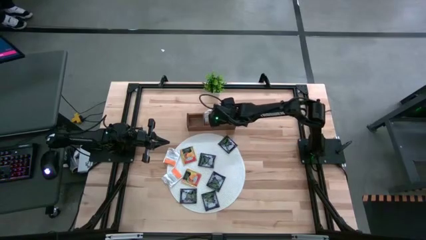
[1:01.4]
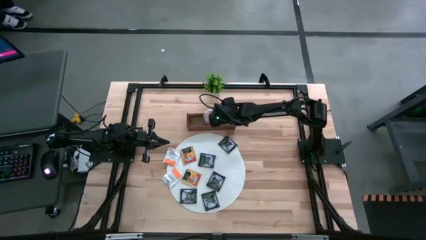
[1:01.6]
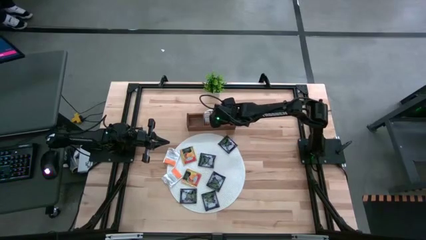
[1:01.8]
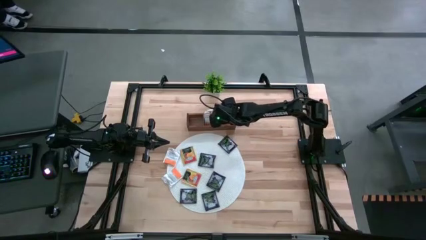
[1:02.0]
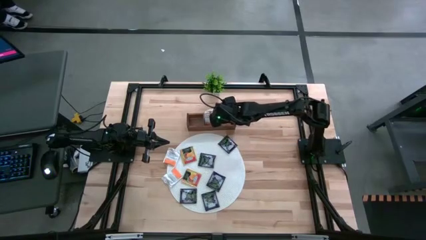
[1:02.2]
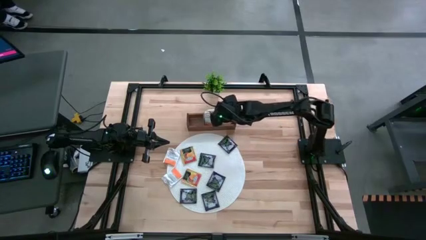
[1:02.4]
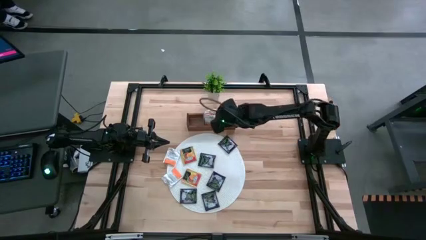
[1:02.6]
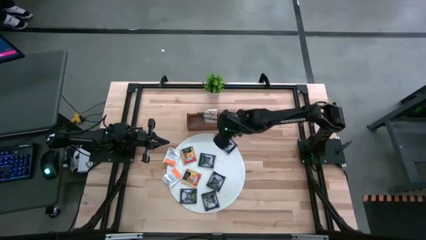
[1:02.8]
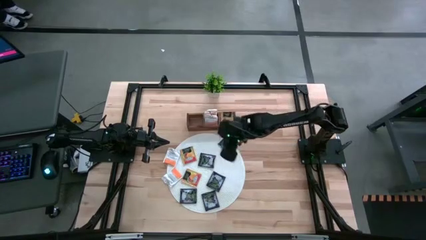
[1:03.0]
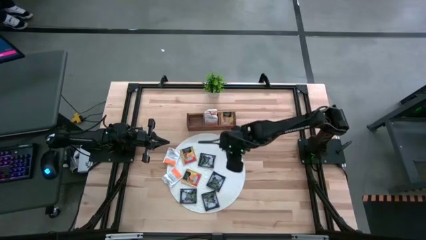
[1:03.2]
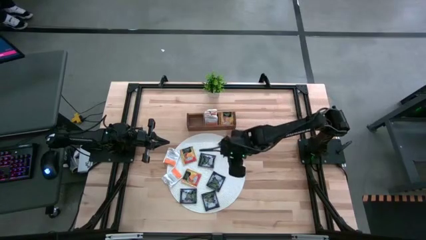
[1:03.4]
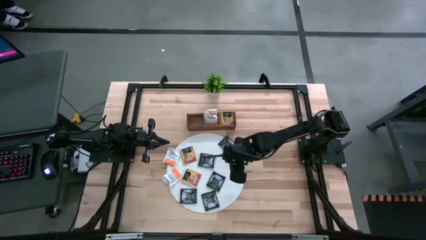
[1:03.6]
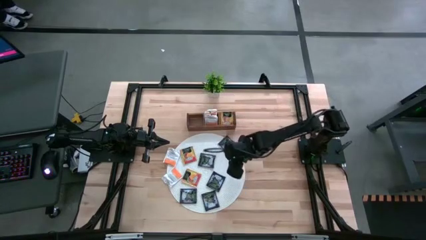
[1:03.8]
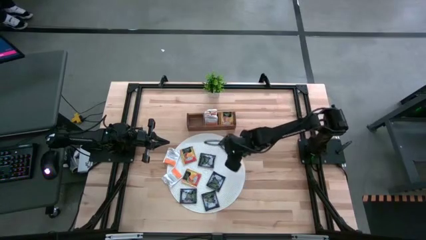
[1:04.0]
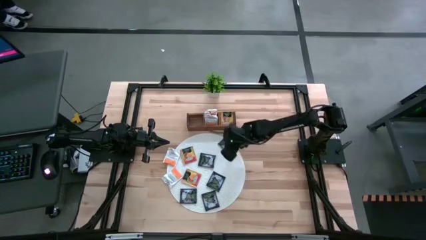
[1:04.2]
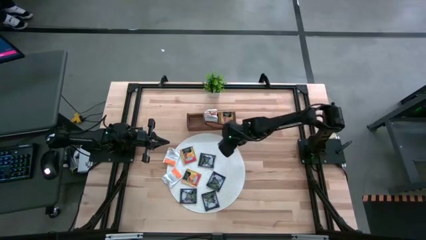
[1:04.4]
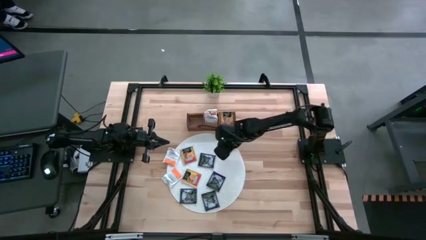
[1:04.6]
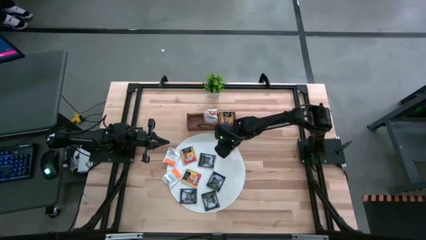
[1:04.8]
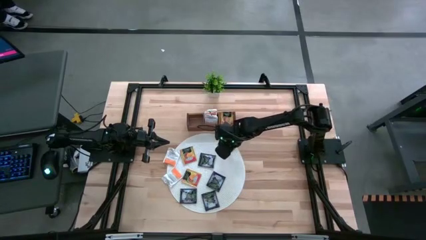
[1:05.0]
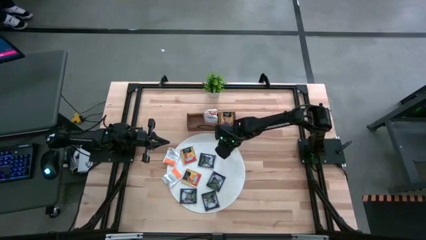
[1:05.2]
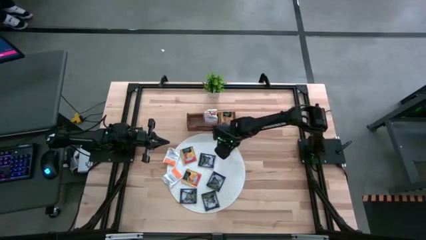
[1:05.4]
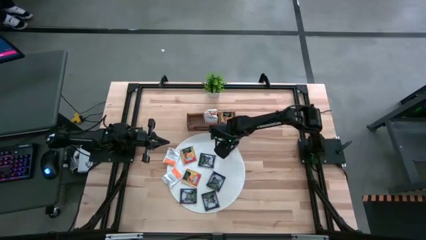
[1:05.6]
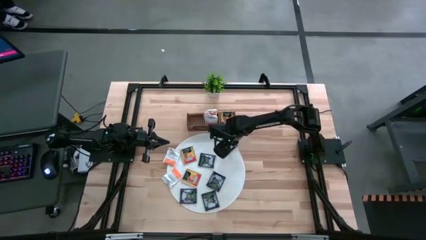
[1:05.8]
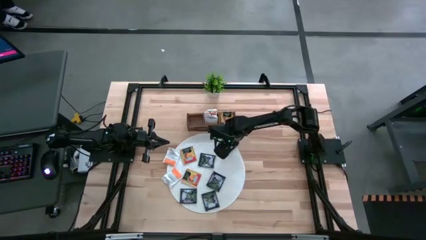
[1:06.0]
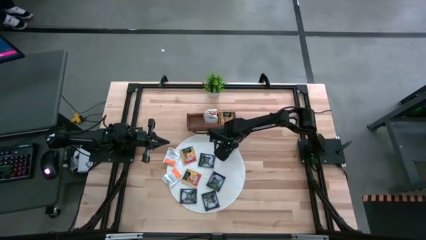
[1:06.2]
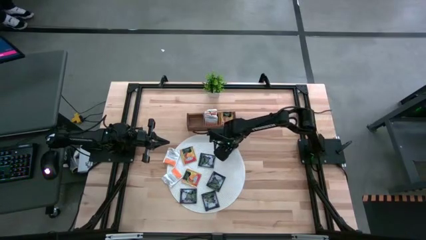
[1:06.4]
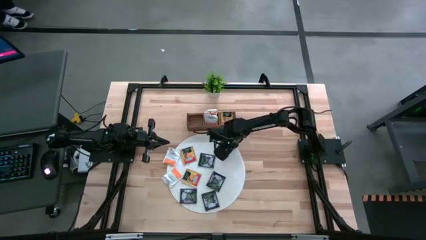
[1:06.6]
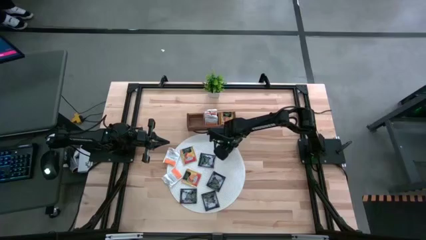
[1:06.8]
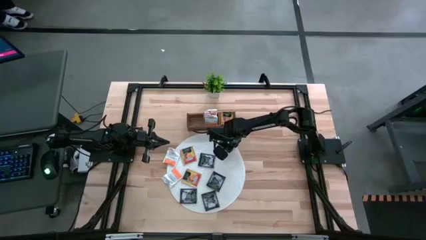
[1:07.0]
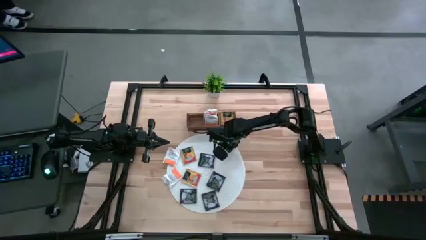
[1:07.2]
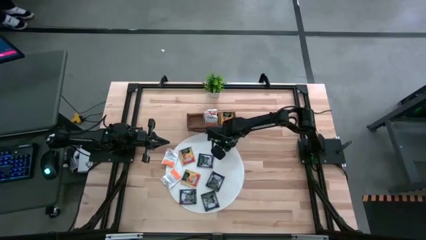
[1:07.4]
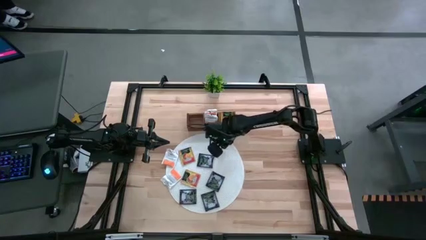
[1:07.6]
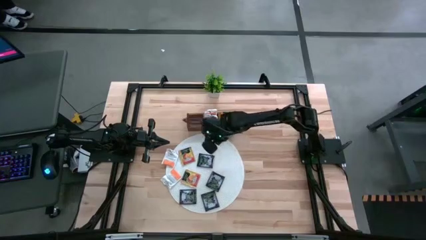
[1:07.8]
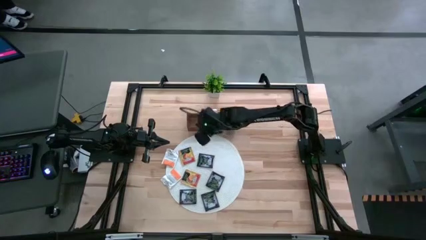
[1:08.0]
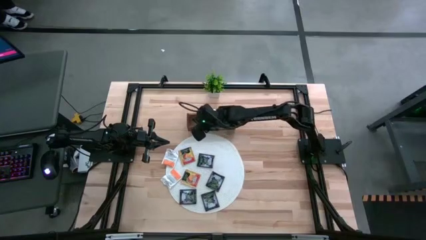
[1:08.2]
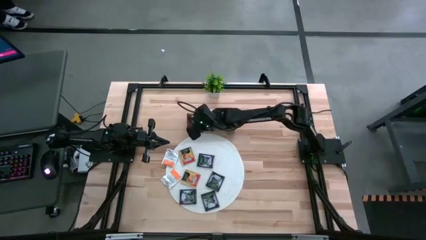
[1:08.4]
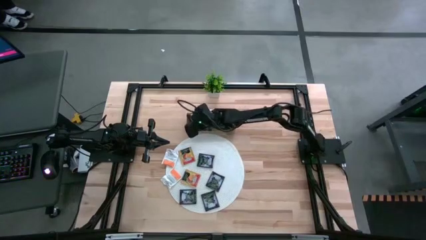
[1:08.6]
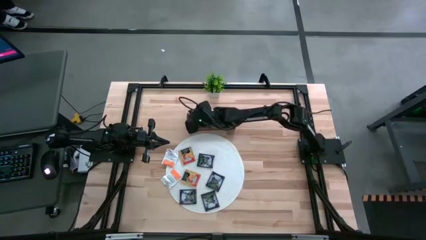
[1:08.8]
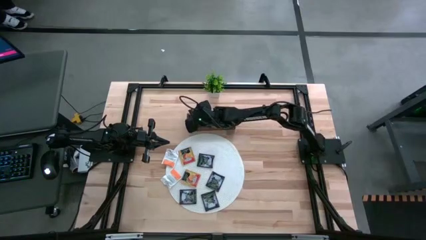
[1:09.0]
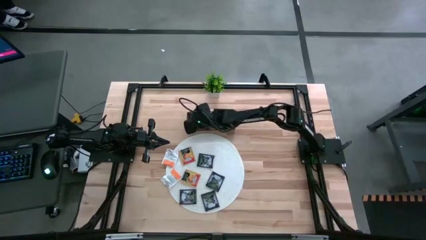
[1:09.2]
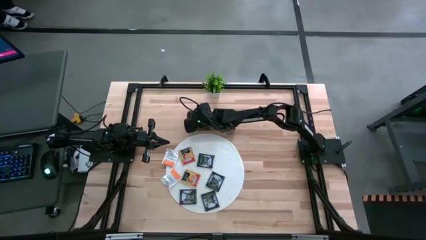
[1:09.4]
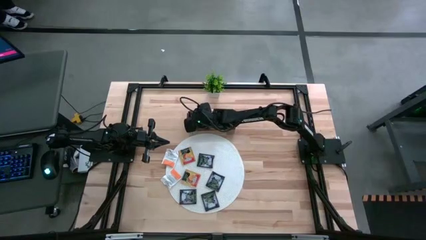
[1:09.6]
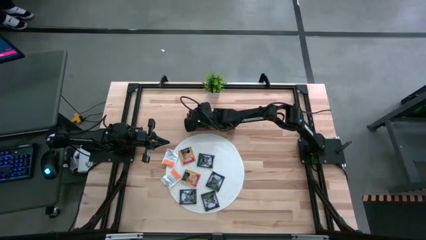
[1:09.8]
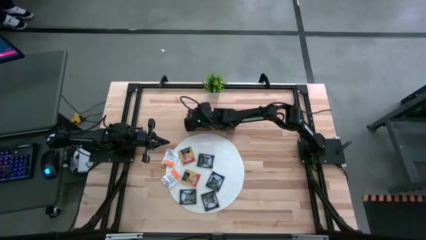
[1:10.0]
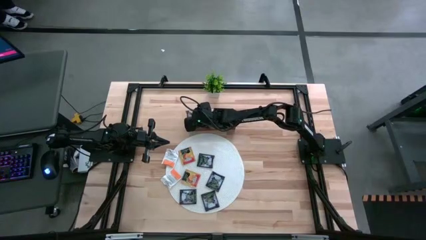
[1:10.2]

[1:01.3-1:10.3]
Task: Pick & Place Tea
Put the dark purple tea bag into the left section of the wooden organizer

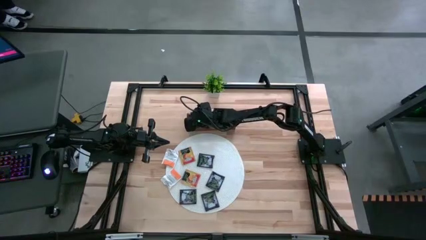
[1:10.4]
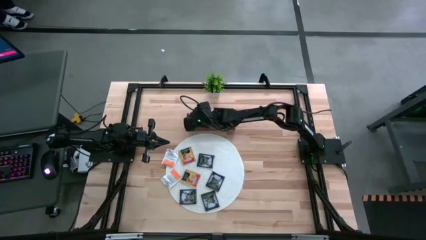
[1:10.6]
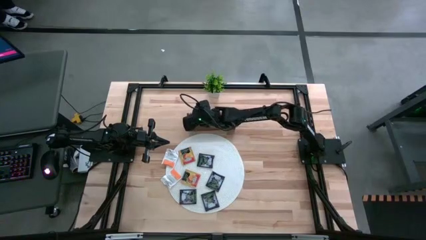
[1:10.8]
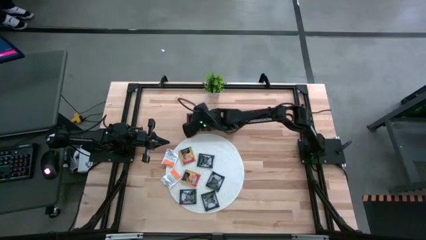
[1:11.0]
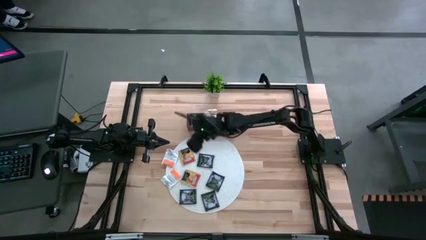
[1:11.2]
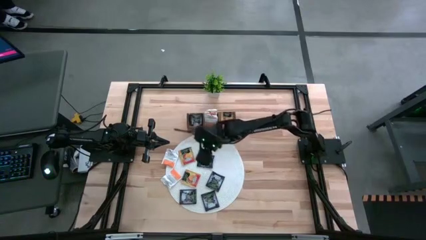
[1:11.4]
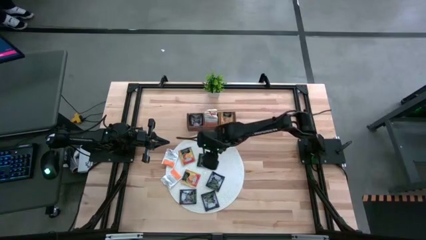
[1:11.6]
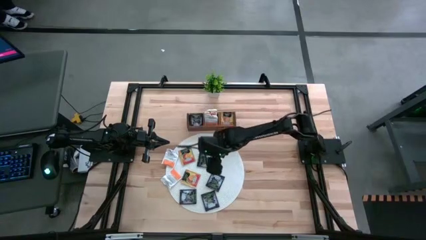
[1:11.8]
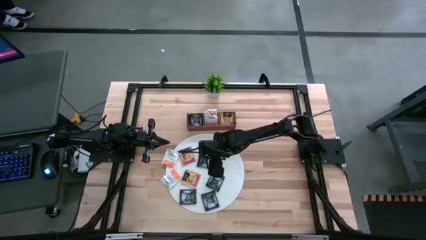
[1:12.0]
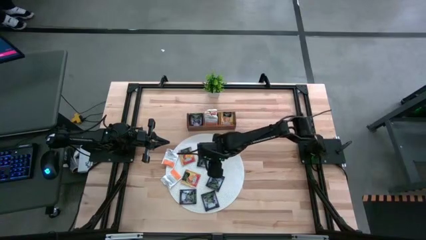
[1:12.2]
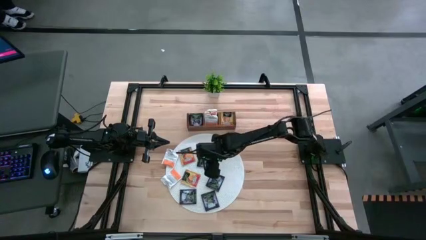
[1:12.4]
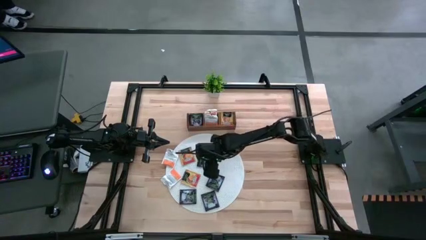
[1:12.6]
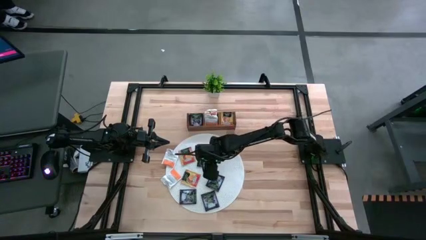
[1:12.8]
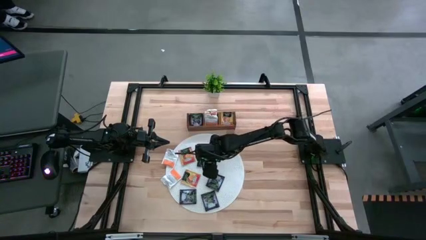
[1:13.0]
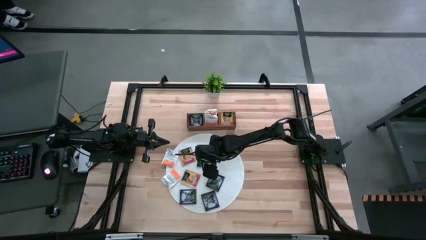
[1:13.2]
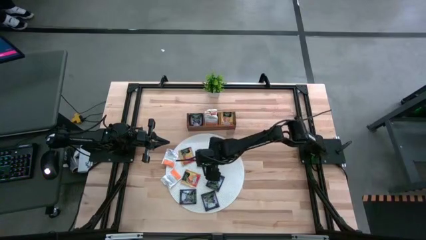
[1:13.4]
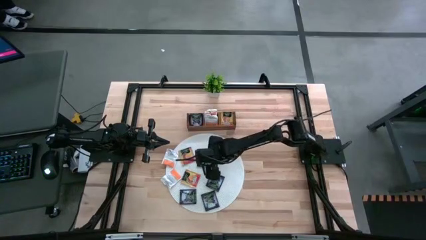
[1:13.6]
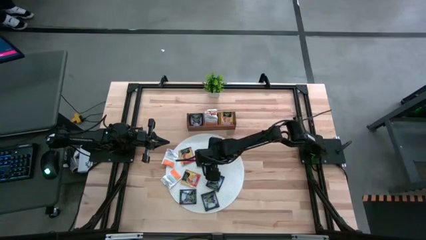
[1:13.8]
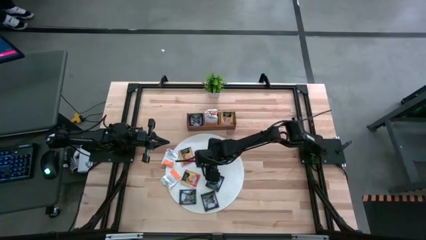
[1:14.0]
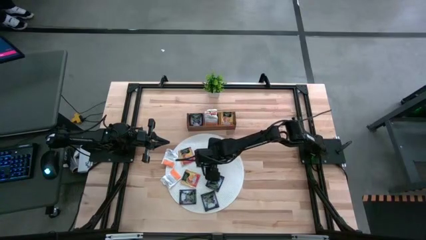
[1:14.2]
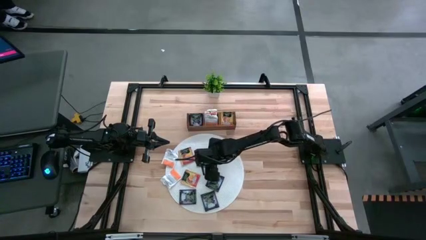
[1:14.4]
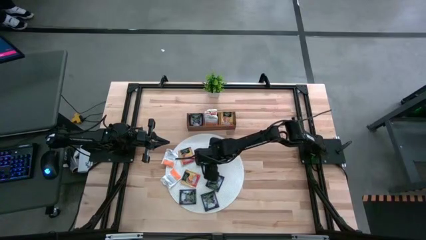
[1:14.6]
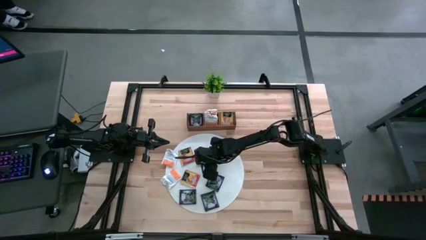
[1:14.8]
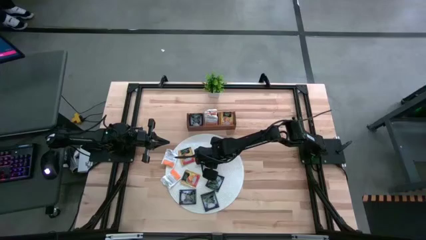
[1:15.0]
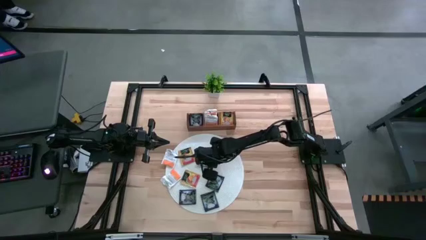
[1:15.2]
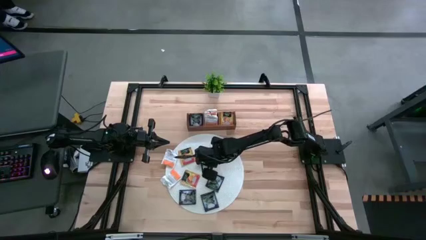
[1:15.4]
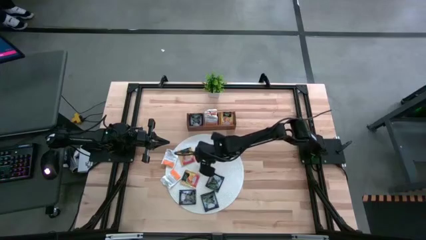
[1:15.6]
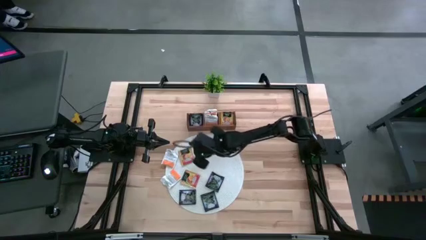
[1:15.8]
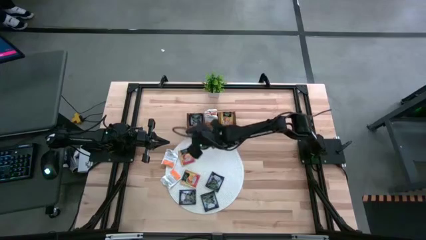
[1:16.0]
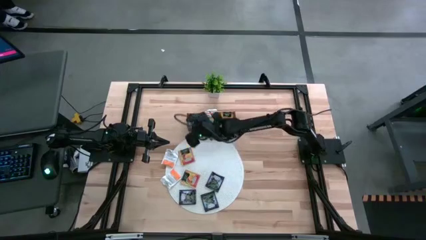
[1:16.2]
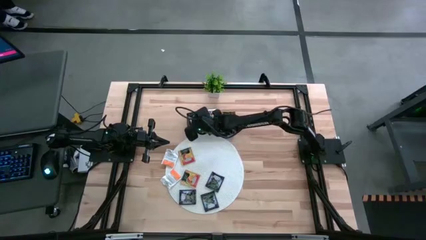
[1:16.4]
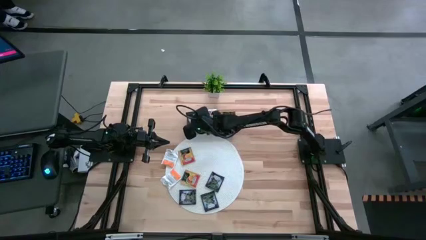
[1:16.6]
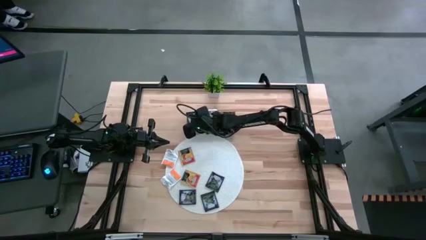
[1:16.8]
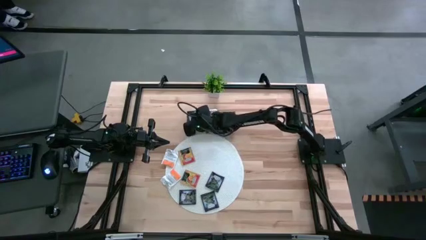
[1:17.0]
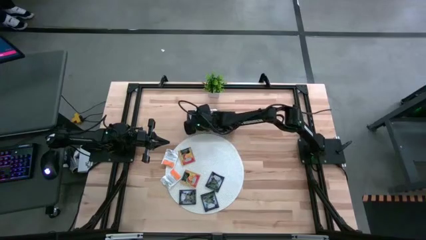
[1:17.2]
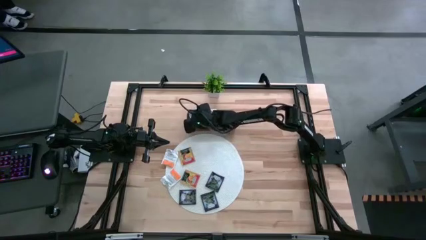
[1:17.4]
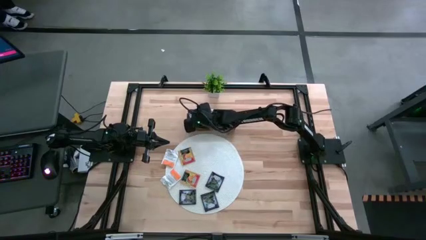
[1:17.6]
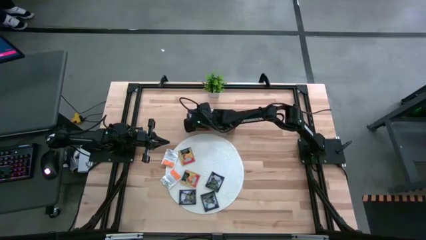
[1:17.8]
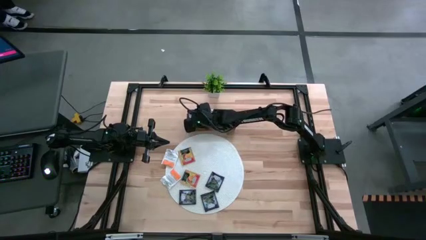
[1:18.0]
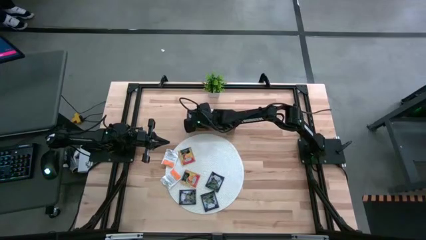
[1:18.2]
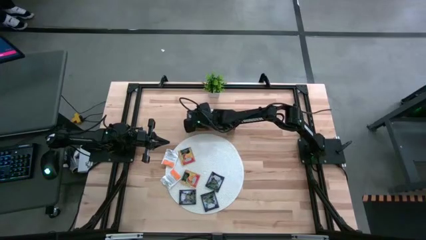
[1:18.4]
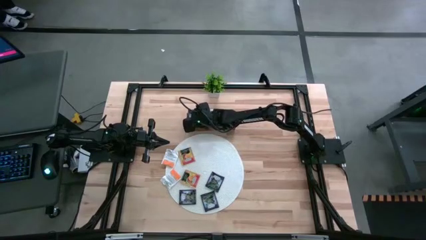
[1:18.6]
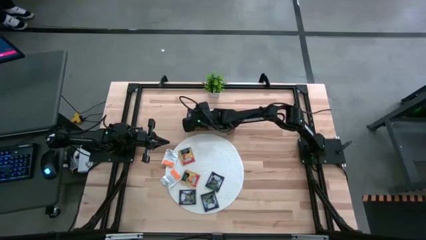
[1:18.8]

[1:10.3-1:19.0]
Put the dark purple tea bag into the left section of the wooden organizer
